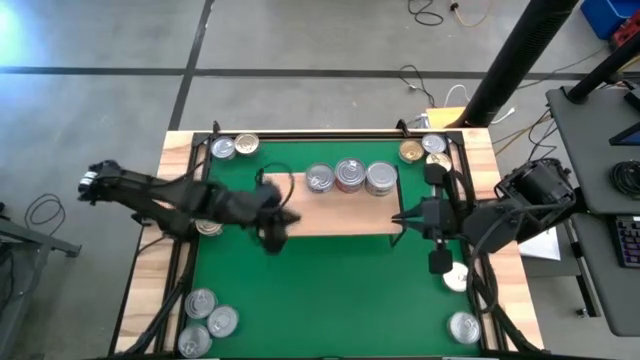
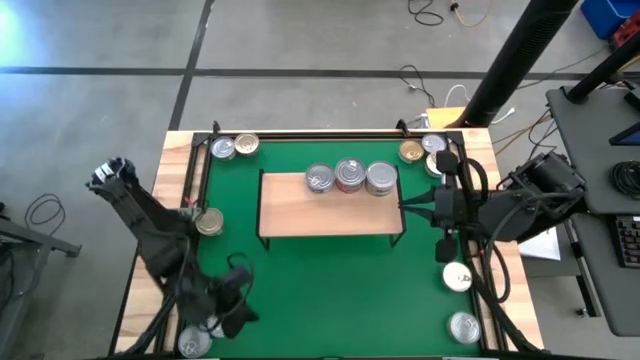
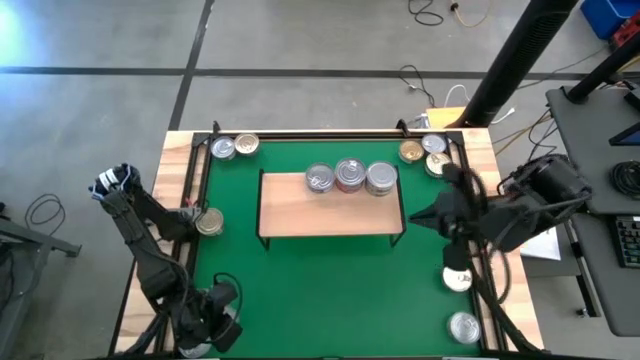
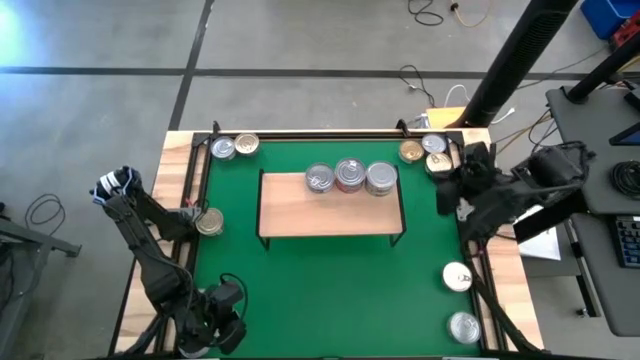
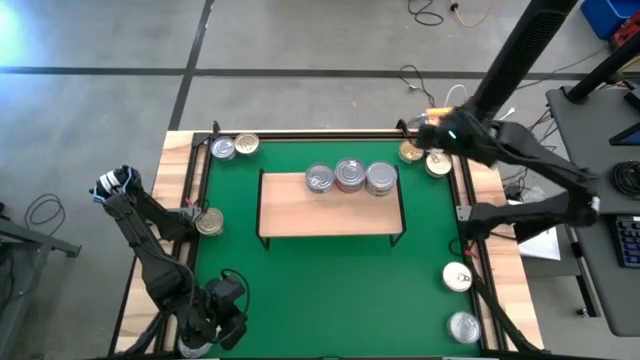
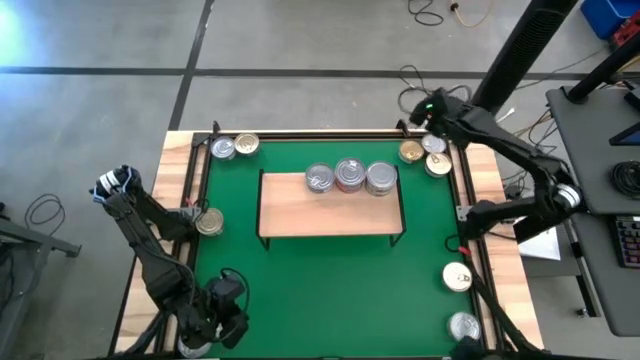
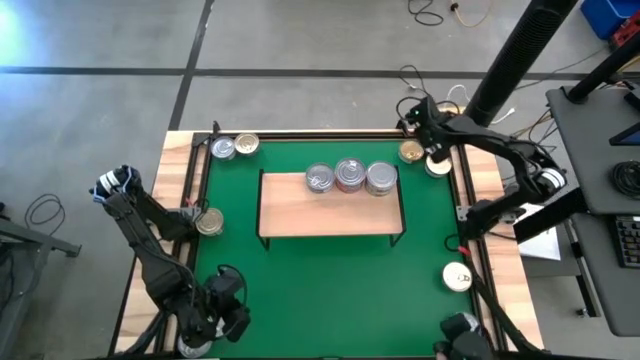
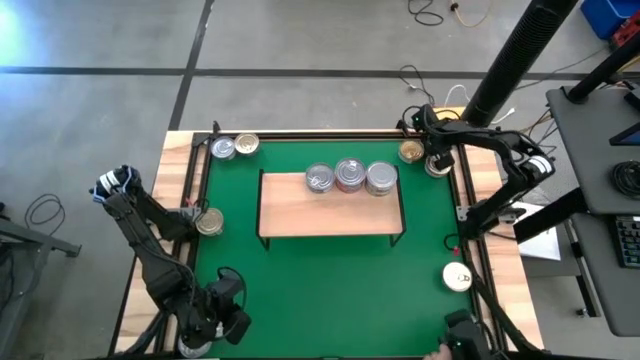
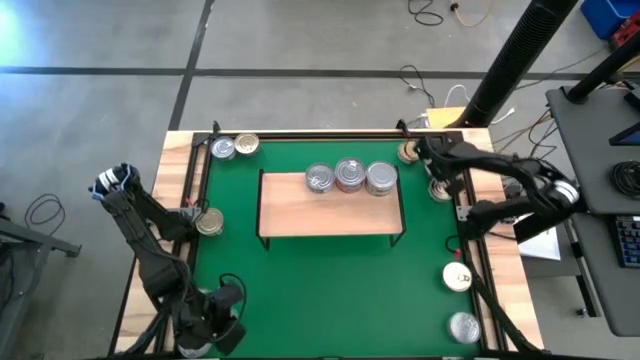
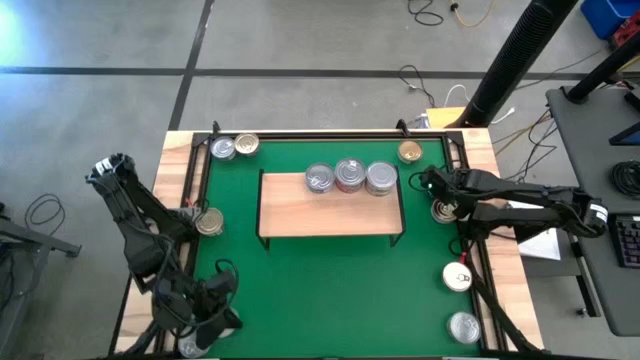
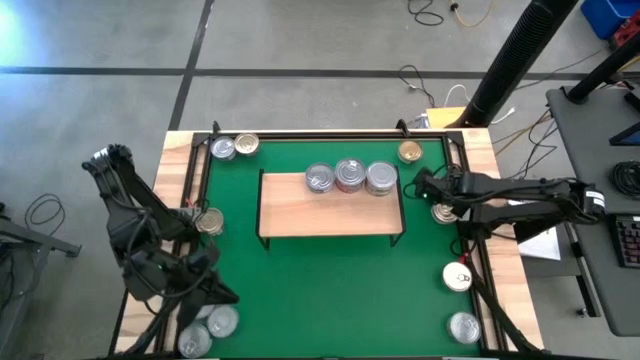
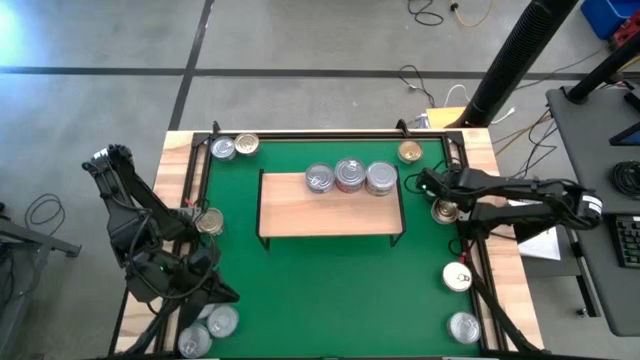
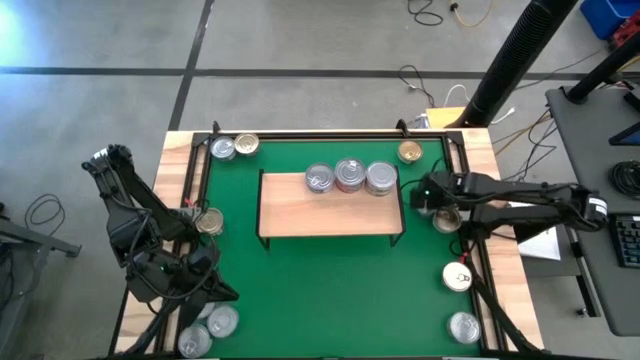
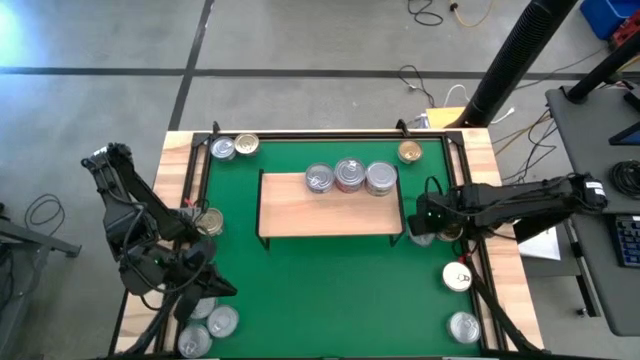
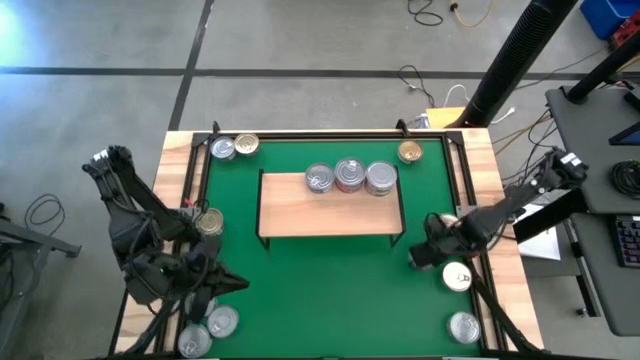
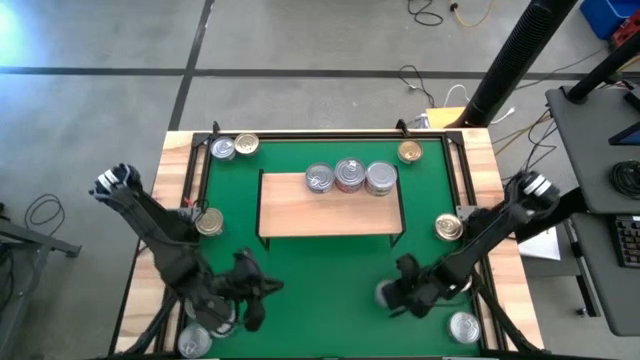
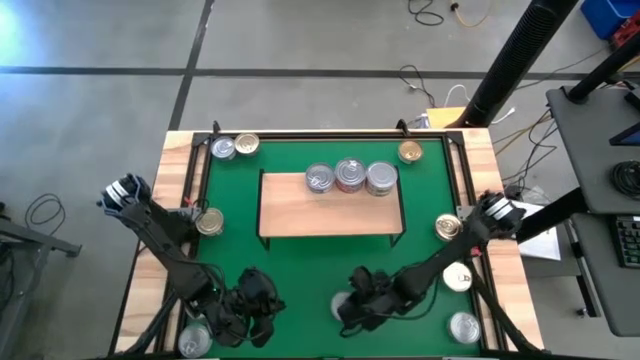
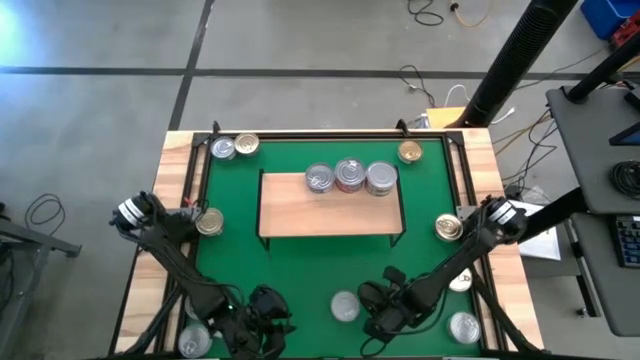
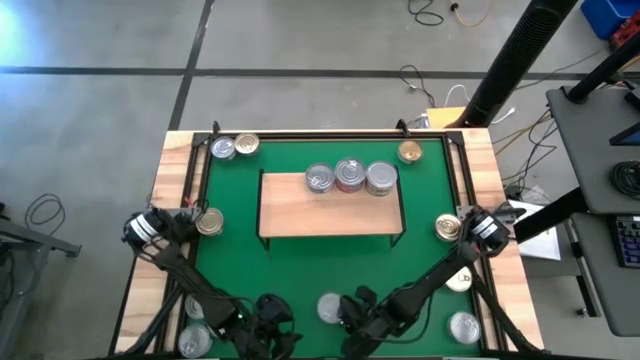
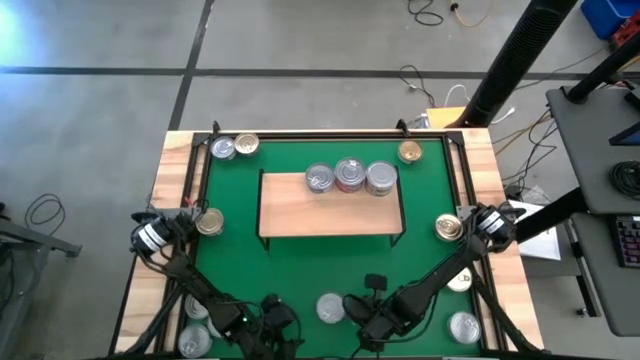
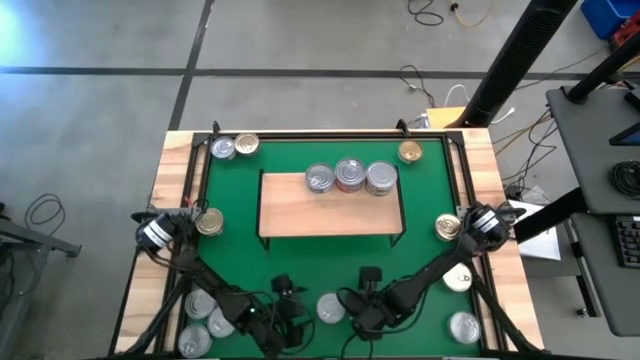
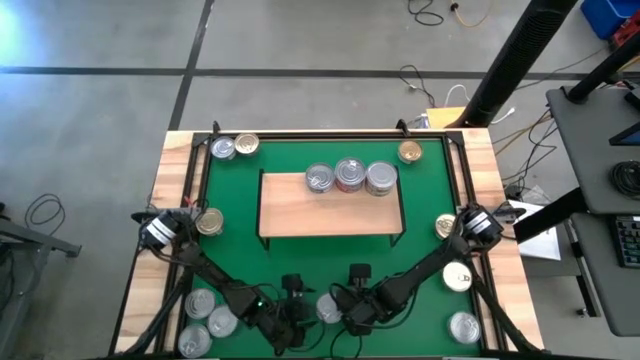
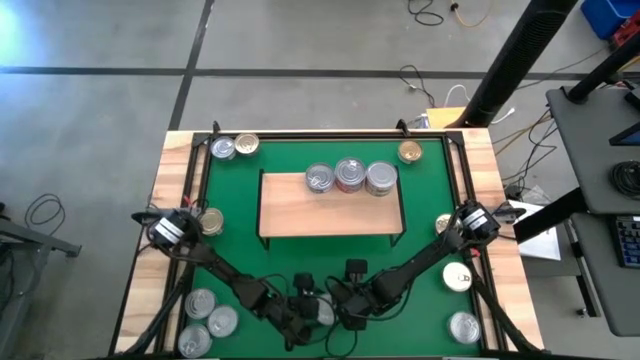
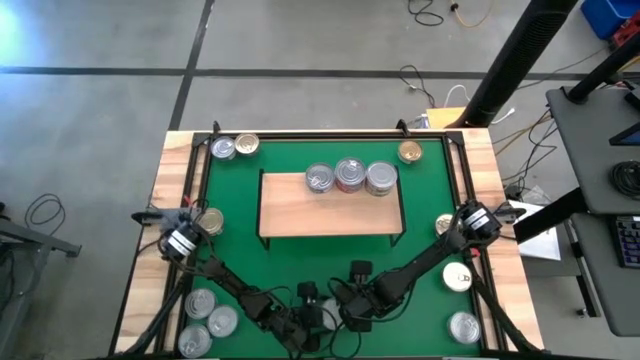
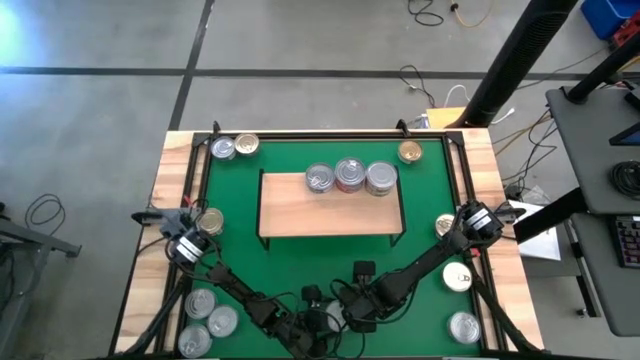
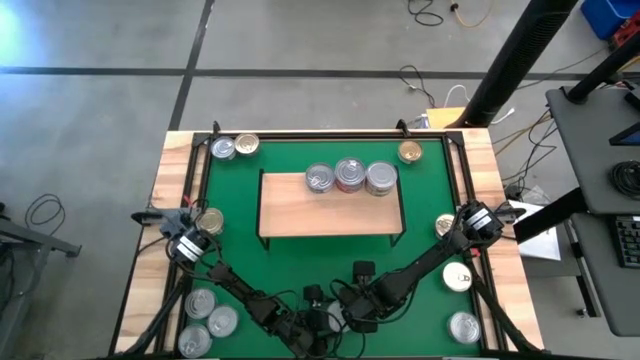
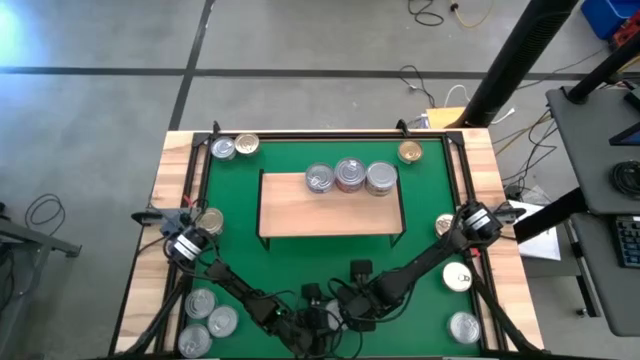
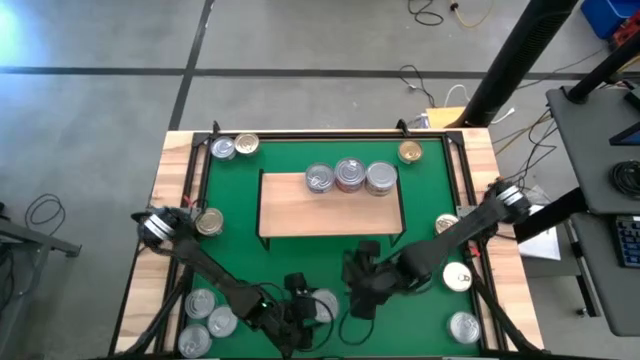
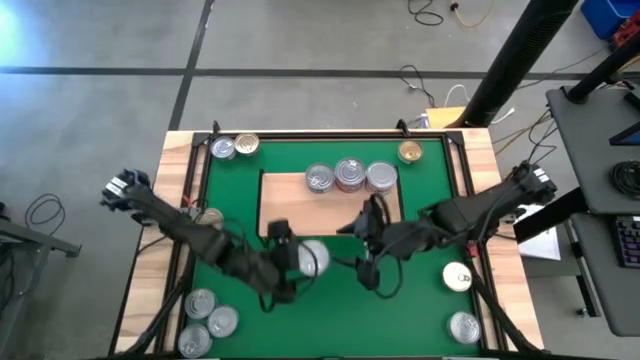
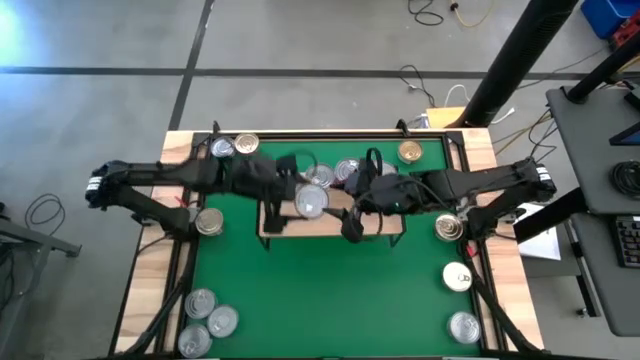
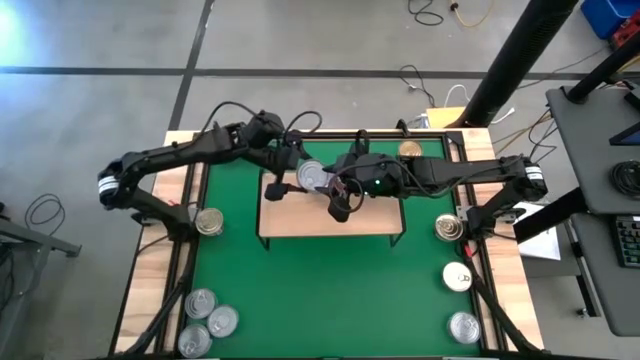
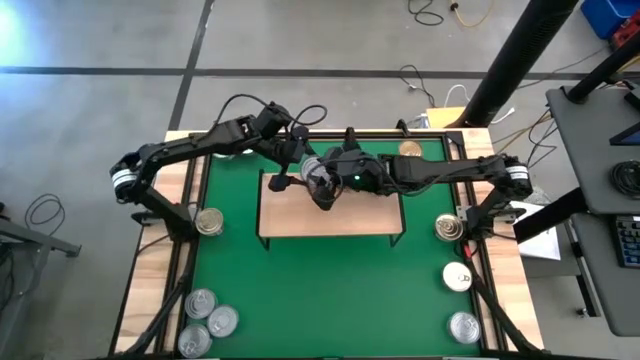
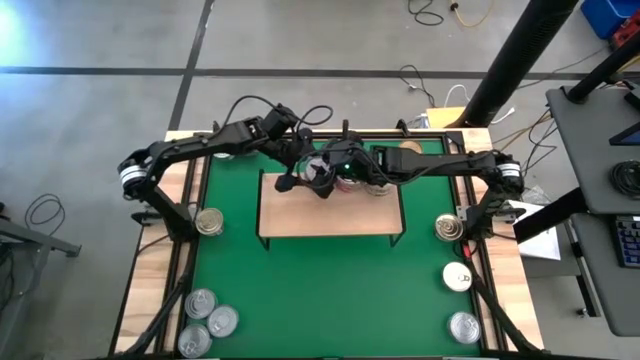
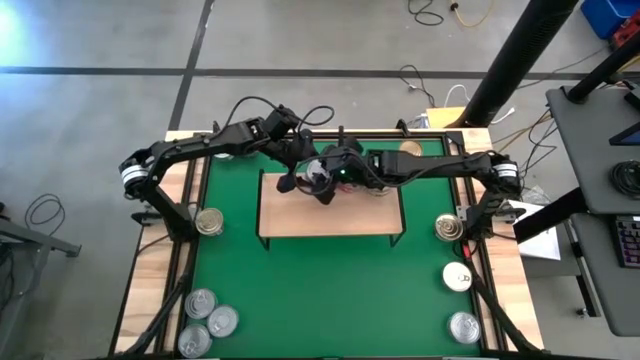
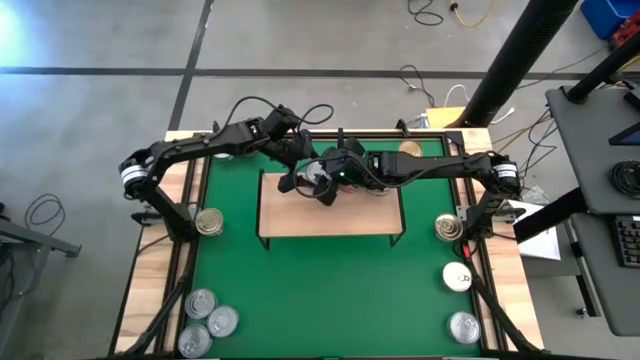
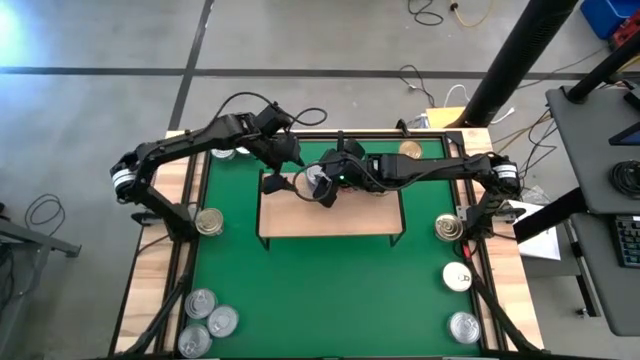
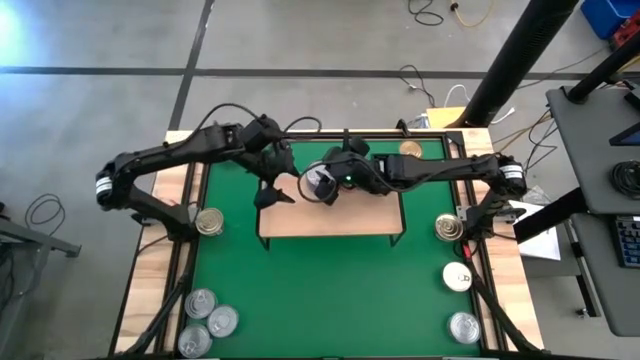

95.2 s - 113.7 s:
Task: Stack canned seafood by type on shelf
Stack the blue tuna can on top of the blue tuna can on the shelf
